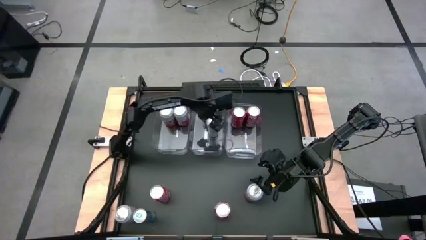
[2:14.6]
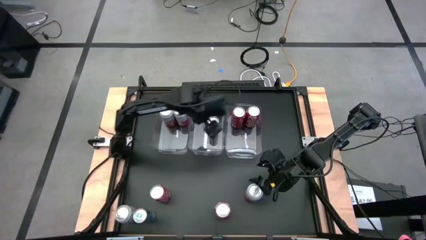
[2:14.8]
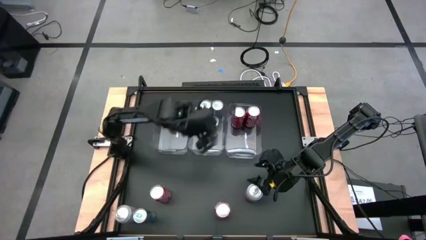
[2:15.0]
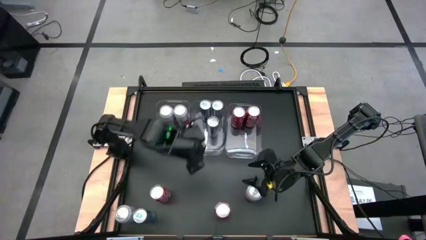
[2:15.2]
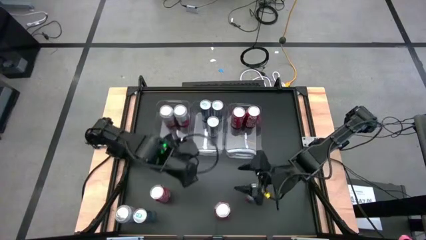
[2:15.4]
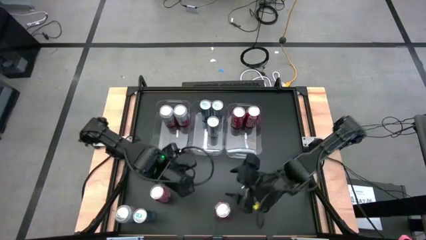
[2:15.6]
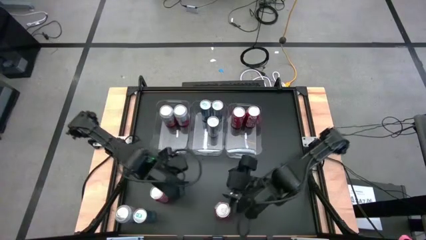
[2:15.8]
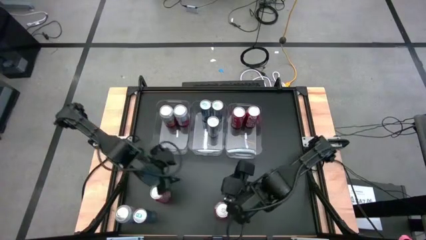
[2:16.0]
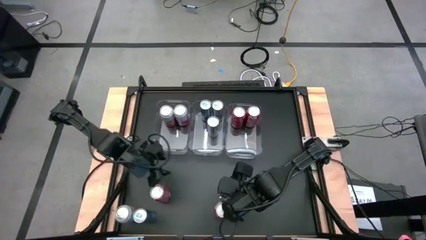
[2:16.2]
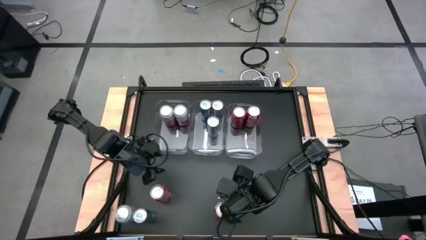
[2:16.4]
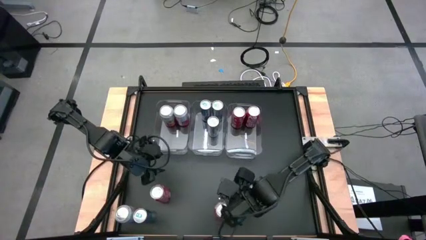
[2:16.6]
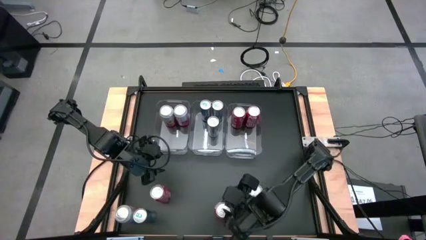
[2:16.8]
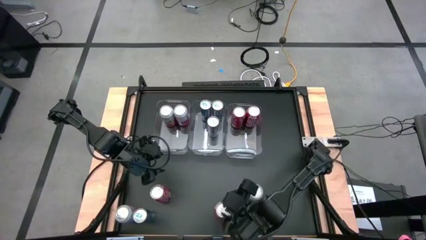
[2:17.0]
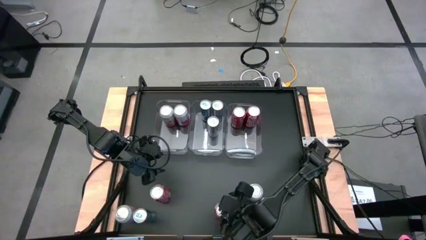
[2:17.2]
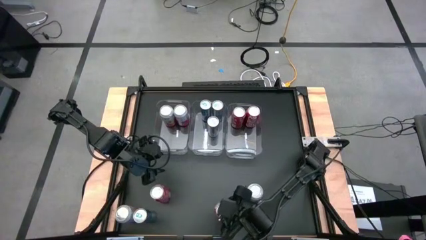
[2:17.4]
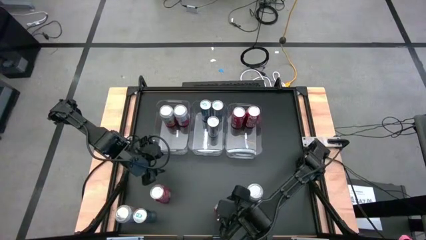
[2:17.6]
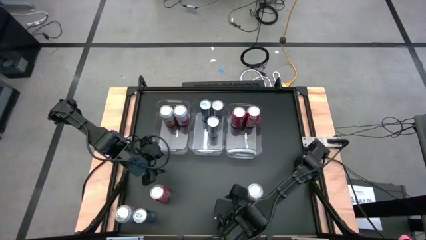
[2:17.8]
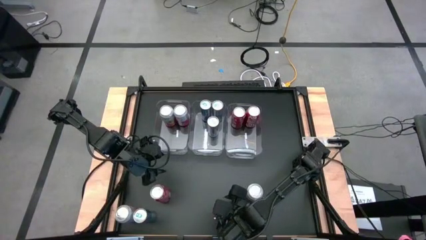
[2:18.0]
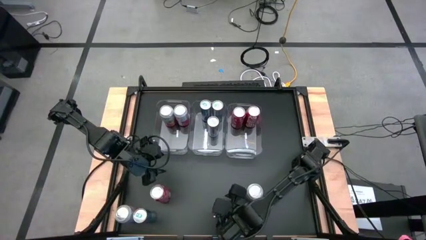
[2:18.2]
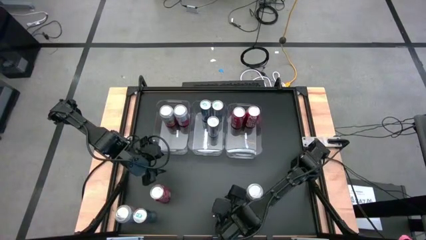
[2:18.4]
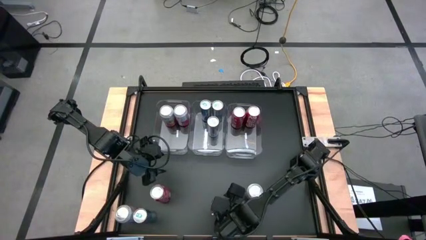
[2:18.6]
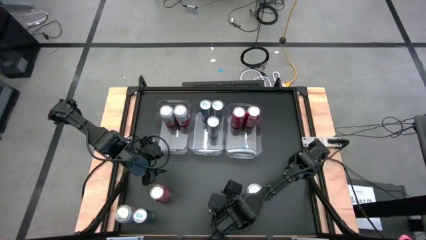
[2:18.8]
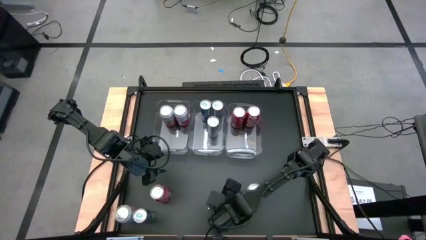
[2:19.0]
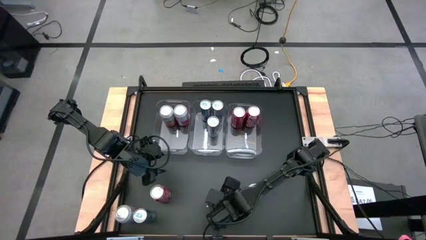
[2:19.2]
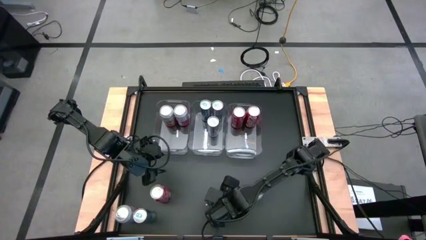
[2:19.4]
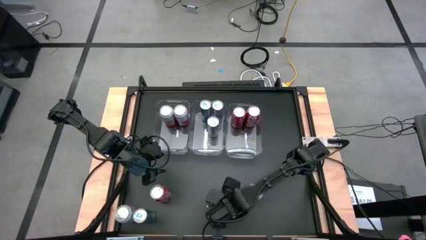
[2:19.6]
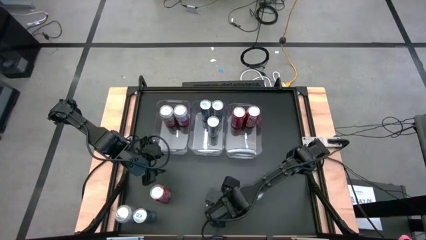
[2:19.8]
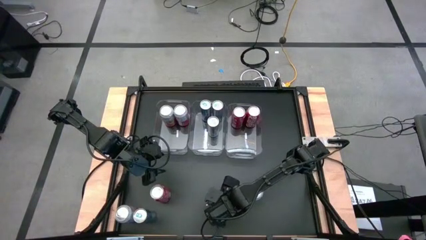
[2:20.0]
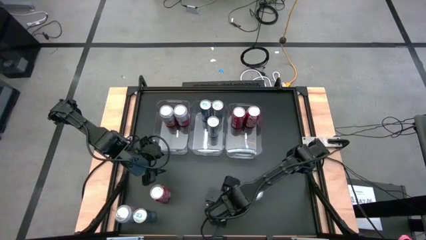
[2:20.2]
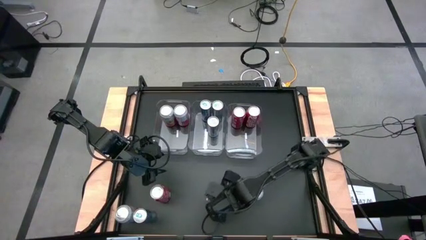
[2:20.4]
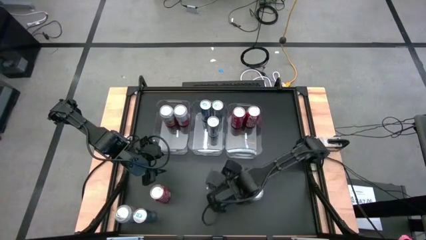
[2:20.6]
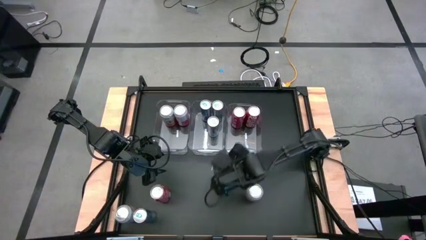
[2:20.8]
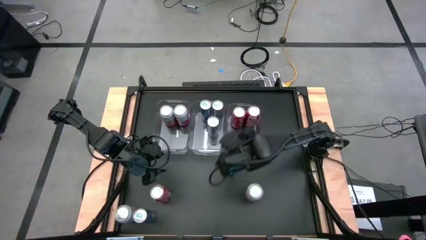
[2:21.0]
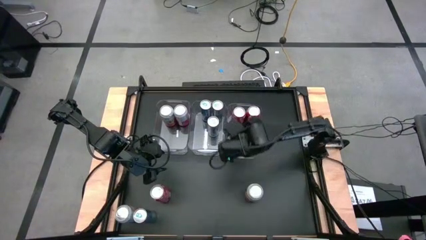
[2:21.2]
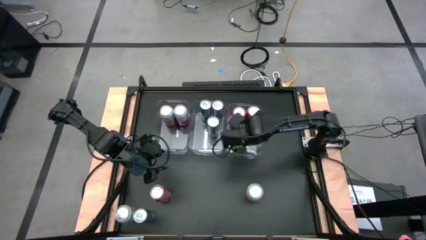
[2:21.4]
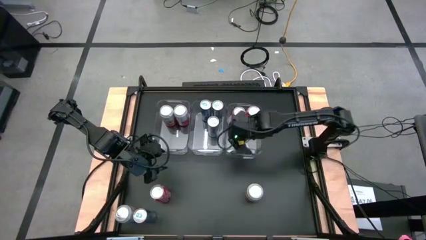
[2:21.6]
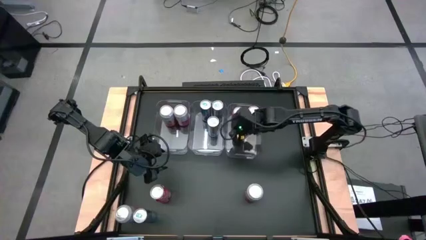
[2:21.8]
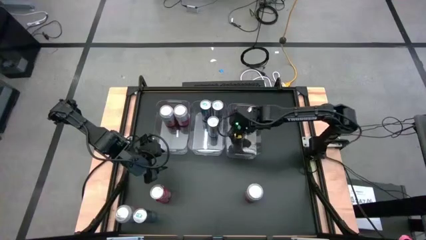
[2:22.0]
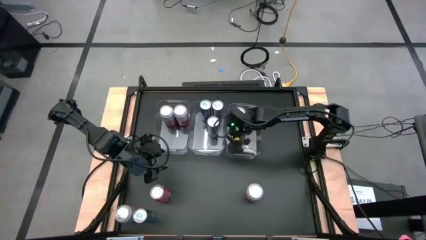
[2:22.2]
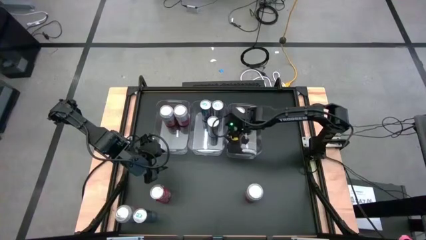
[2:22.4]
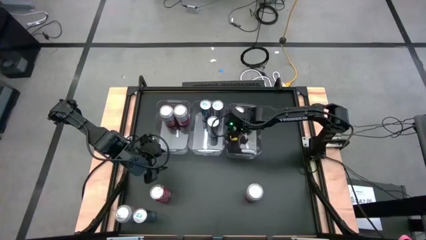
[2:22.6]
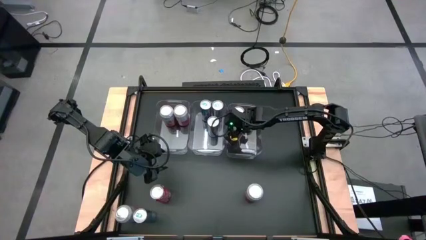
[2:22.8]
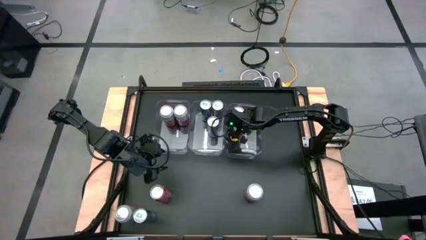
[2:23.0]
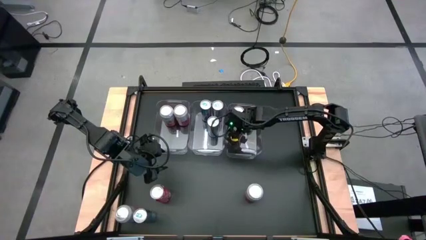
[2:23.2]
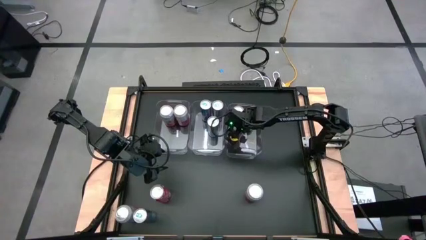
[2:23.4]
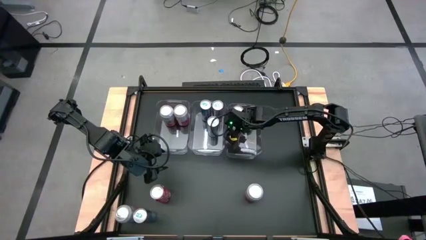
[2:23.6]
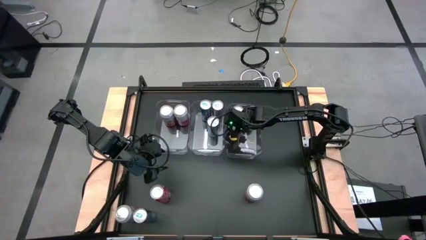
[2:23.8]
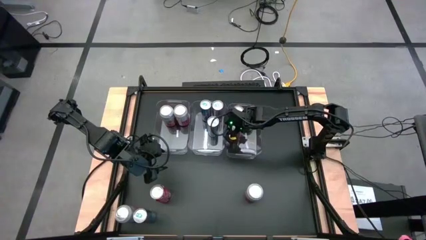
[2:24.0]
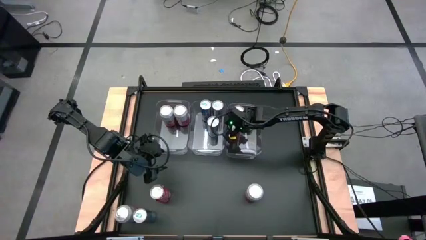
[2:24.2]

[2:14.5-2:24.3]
Task: Sort soda cans
Put the red soda can into the right transparent bin
